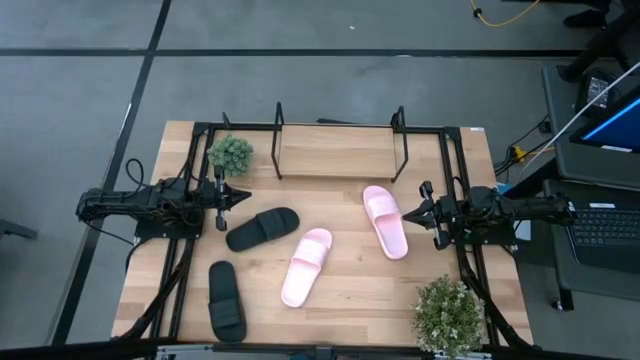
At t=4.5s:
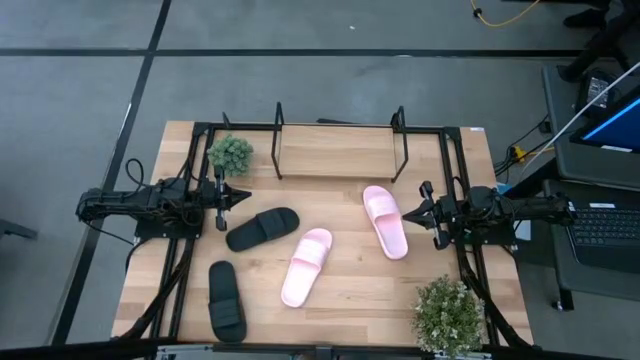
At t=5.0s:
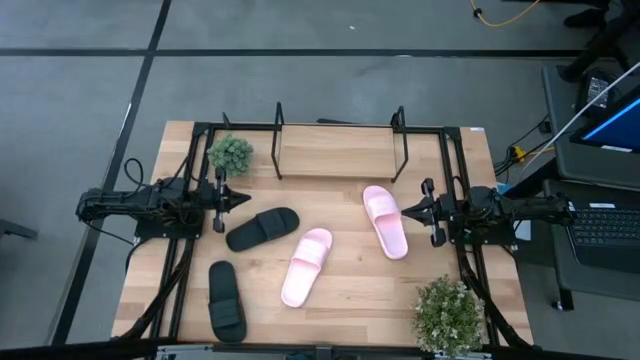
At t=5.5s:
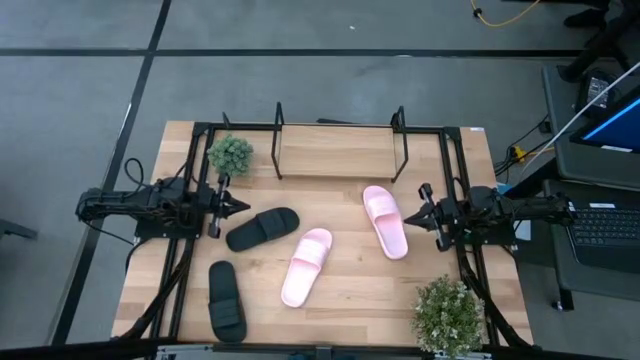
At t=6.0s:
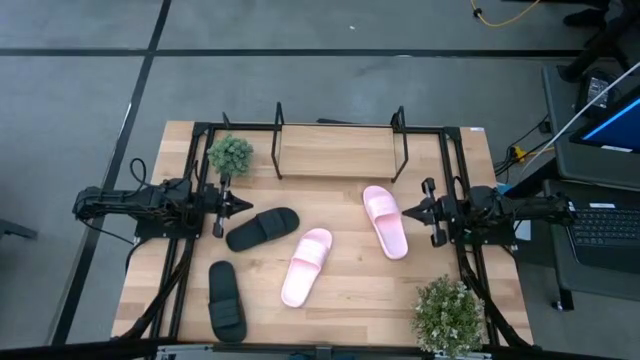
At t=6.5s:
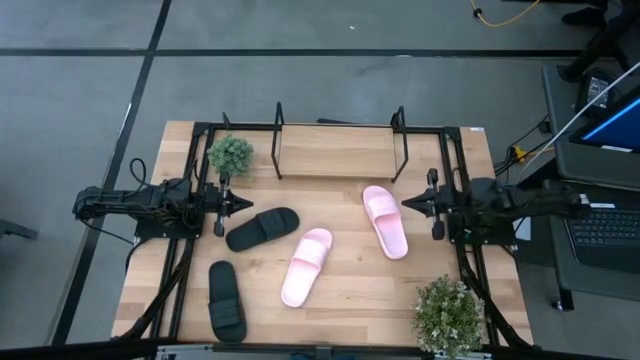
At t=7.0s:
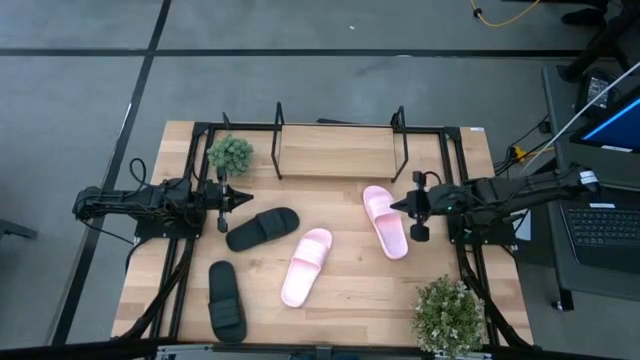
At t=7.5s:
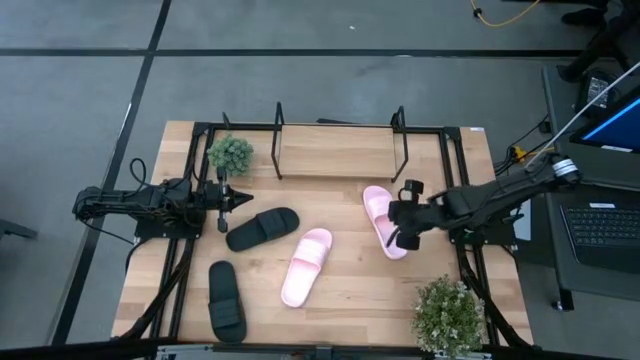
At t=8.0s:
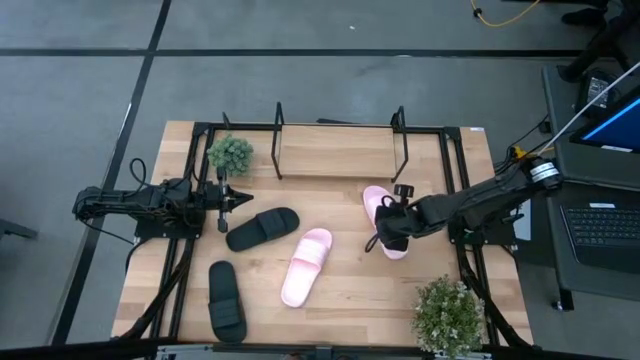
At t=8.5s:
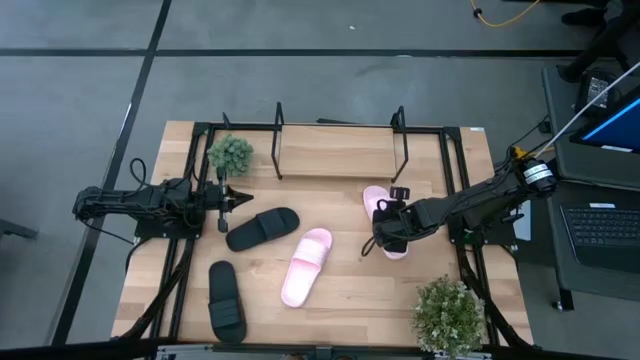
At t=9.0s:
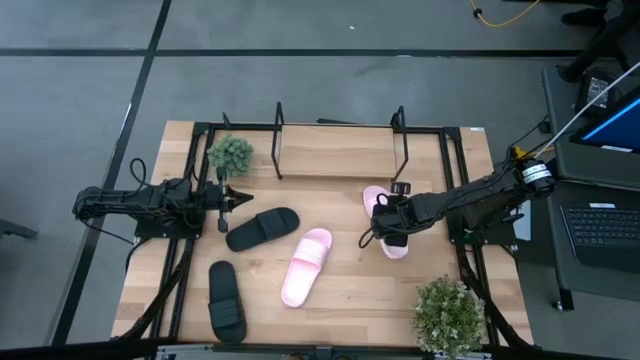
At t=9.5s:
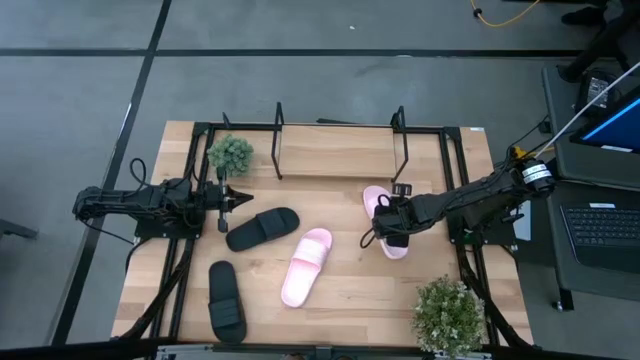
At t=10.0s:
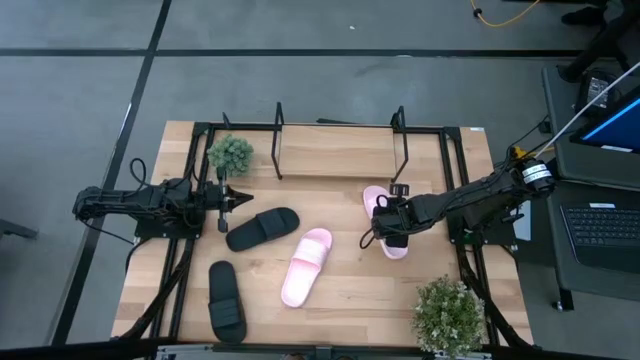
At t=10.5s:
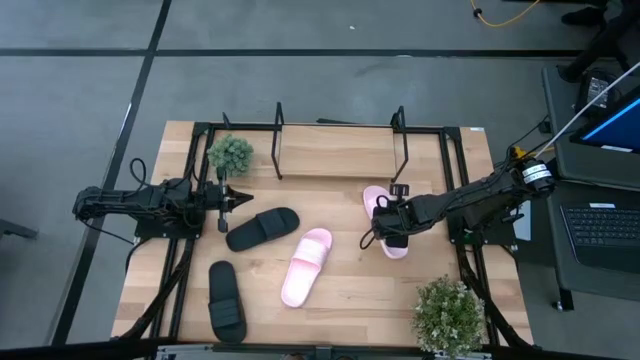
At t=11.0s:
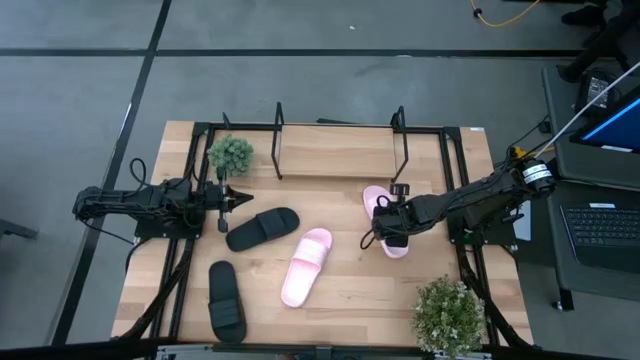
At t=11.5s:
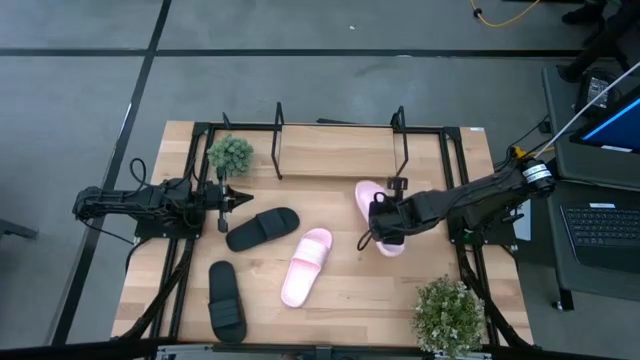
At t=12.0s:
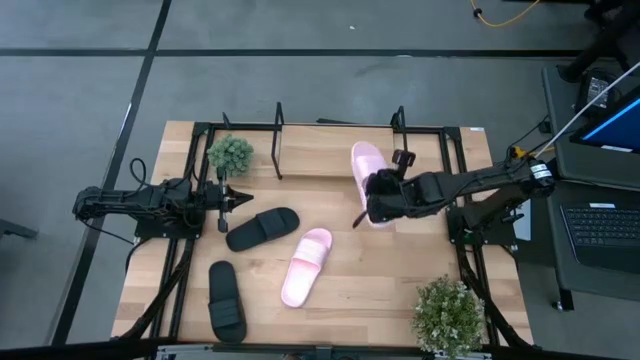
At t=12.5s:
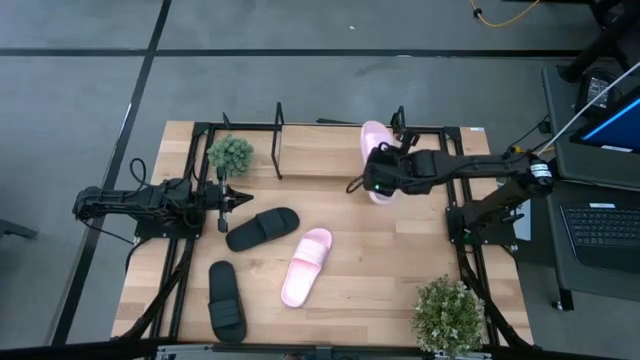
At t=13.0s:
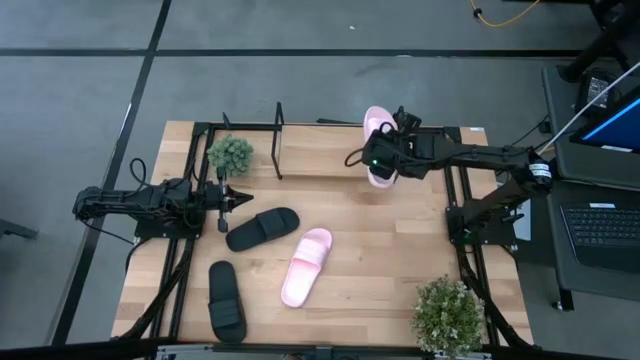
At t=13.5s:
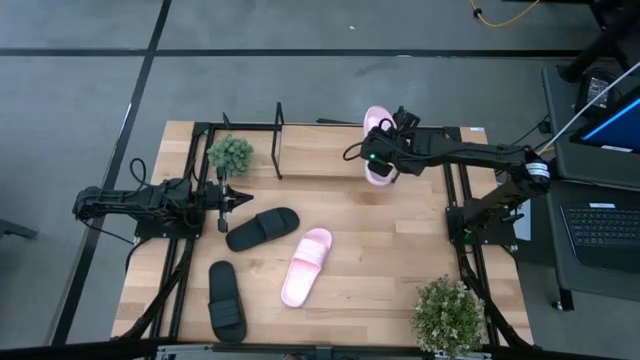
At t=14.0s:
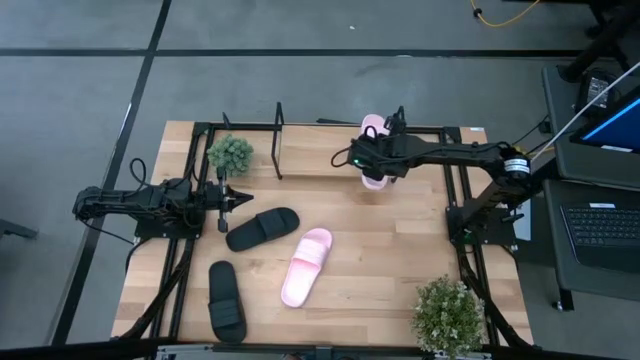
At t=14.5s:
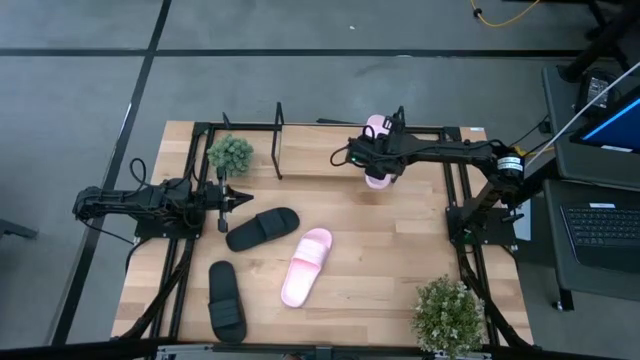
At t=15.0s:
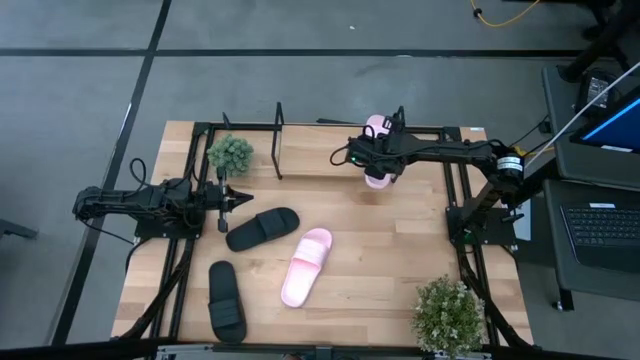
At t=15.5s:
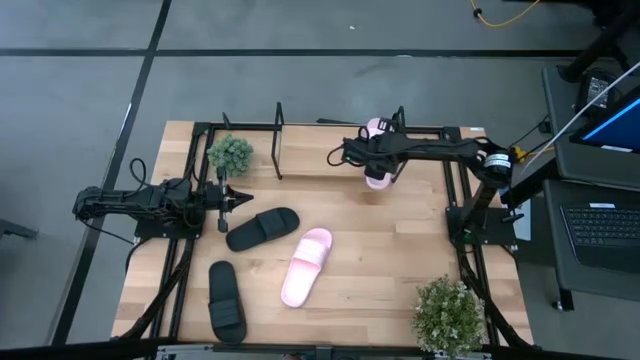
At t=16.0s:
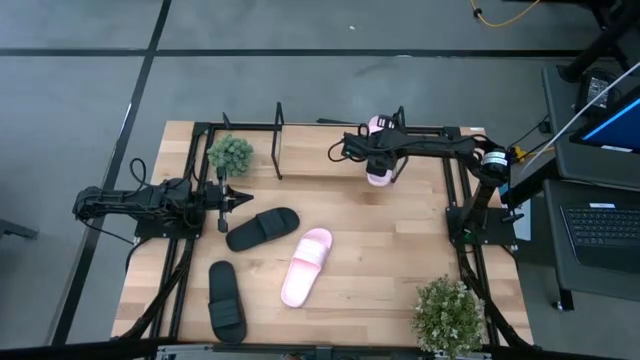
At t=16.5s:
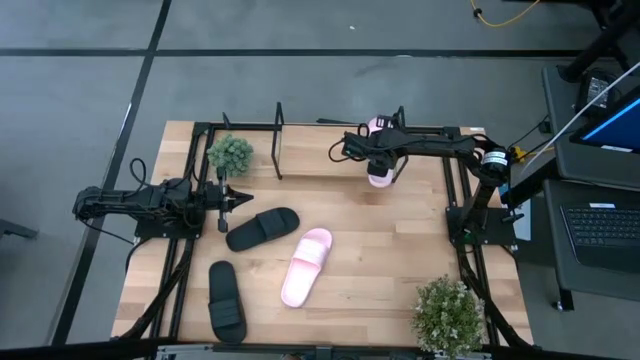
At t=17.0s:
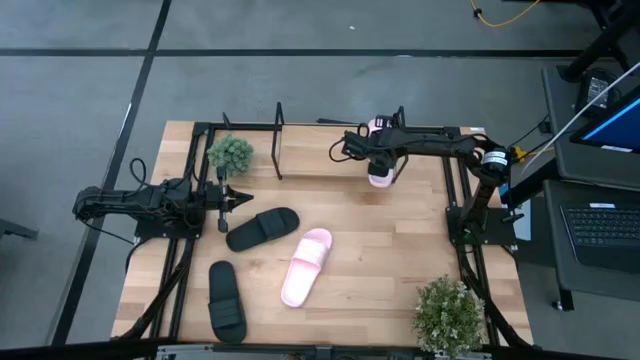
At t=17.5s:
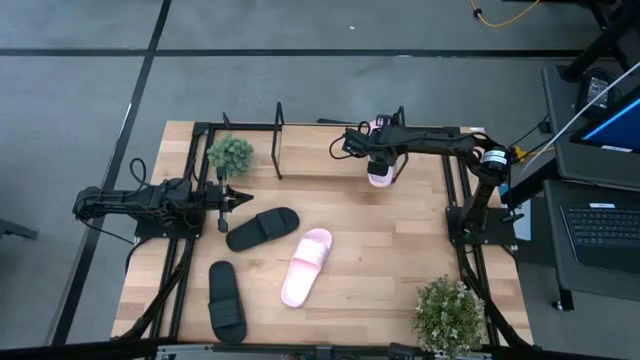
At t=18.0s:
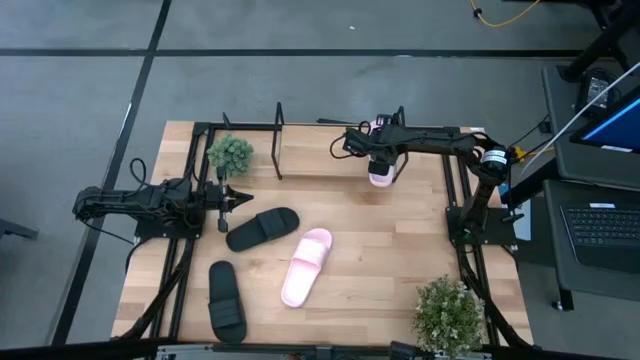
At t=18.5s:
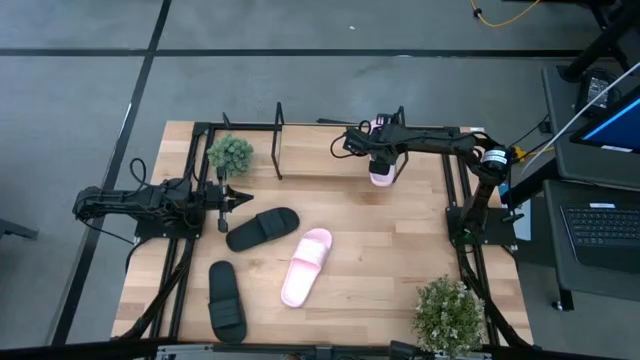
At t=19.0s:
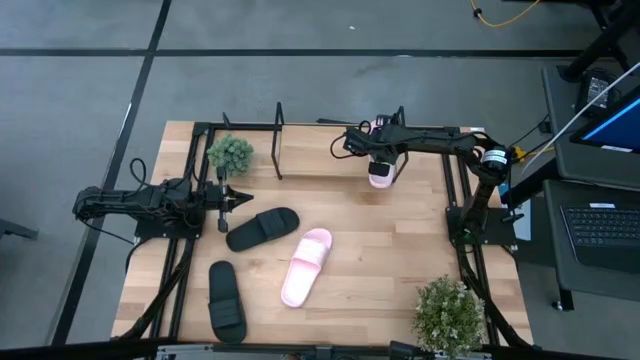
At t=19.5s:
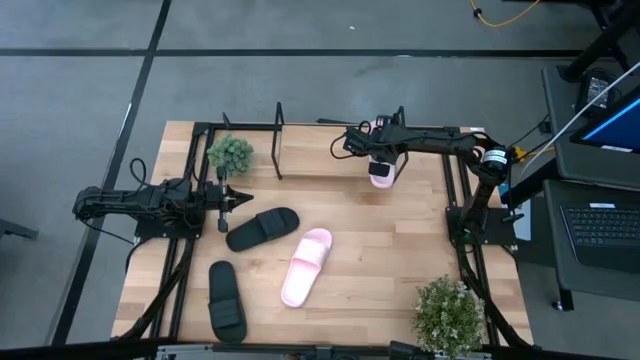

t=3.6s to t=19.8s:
Task: Pick and place slides into the shelf
Put the right pink slides on the shelf
